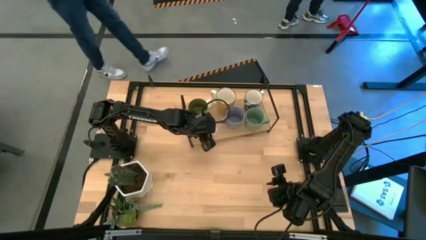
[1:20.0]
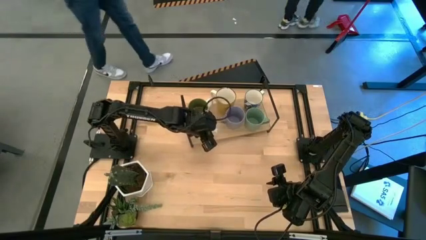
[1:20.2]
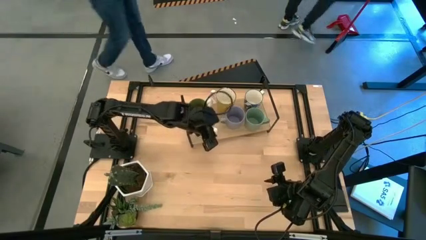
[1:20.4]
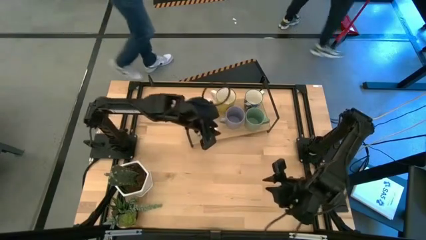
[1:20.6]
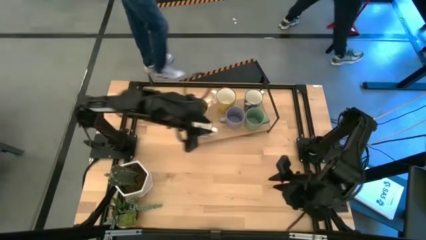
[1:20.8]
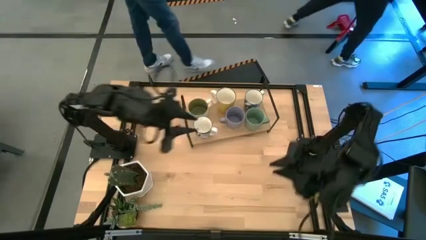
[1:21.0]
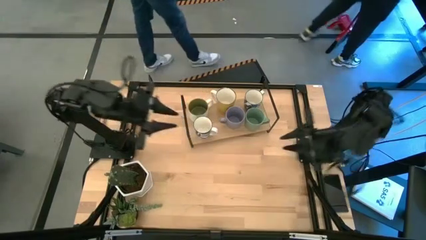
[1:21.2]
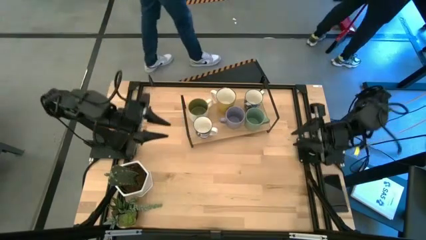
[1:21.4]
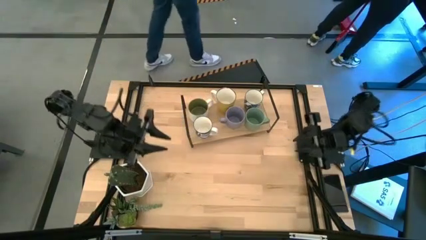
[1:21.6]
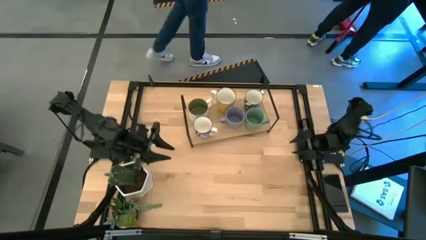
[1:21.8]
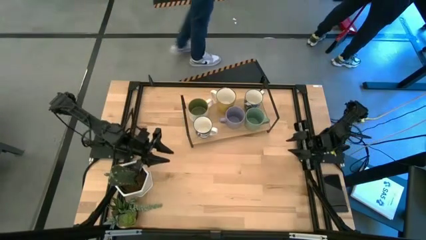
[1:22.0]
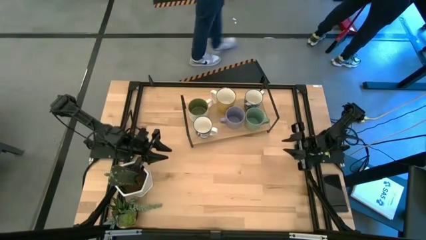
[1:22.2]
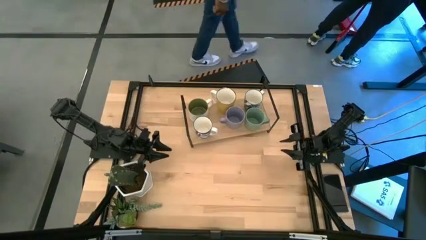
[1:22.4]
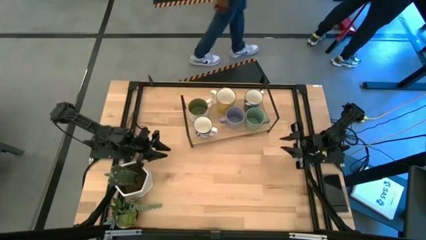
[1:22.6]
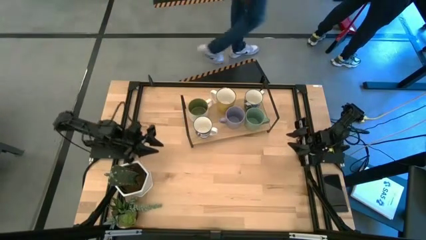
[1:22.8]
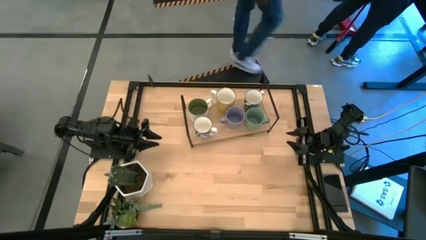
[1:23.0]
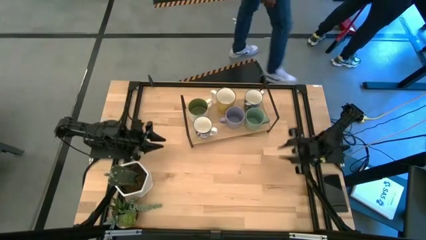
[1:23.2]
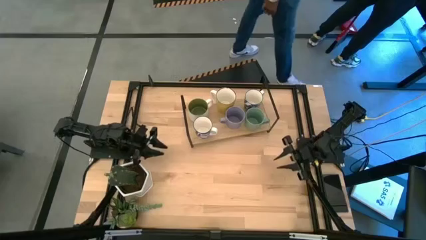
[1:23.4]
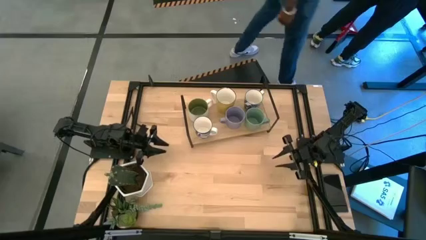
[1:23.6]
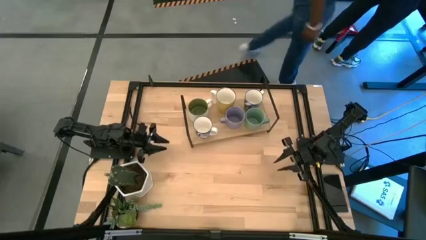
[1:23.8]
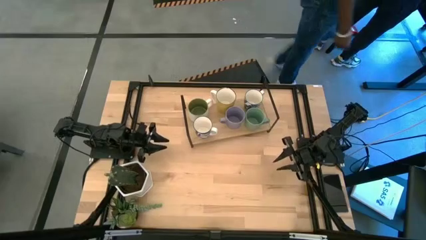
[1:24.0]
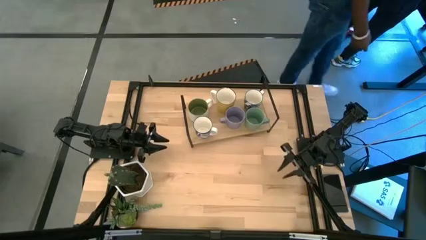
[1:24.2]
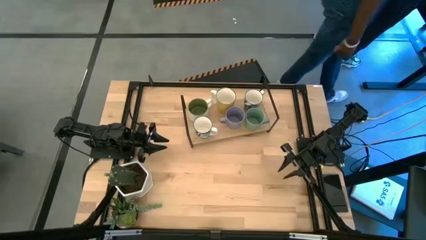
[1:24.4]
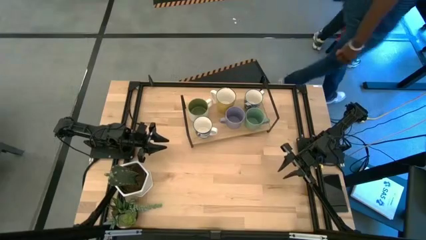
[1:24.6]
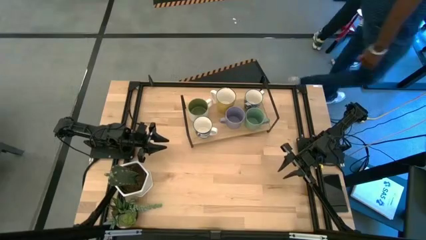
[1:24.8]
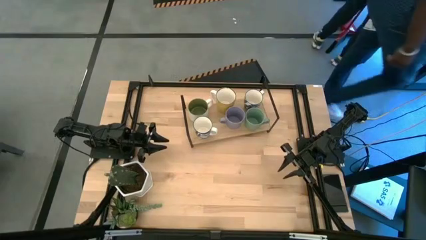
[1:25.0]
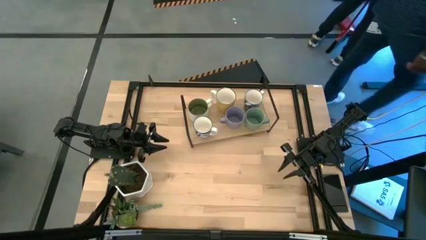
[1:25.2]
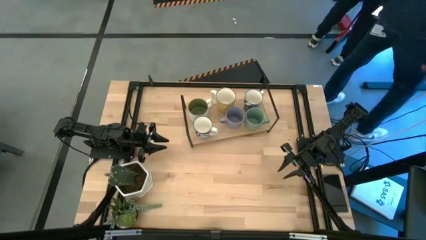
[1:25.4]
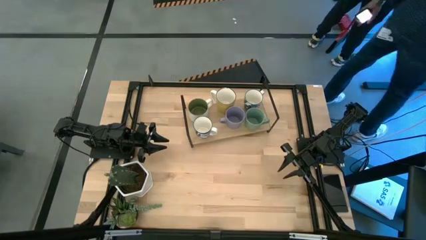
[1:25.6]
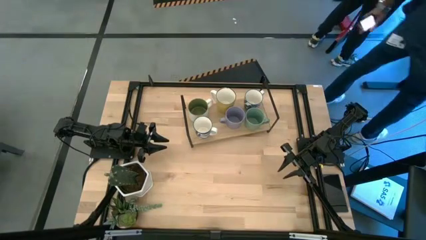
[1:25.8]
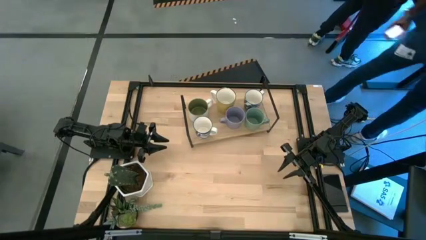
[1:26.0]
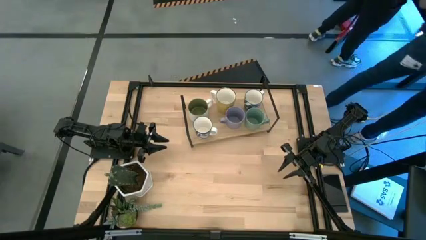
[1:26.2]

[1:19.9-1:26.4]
Task: Place coffee mugs
Return to Home Position

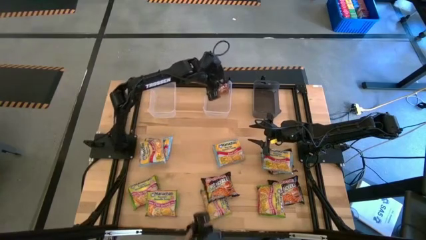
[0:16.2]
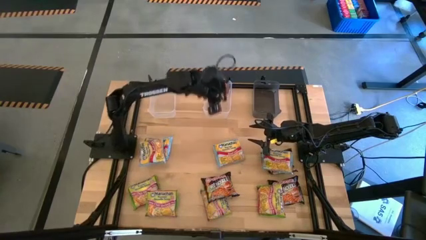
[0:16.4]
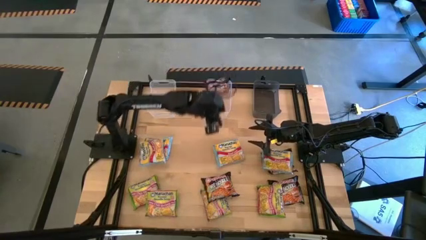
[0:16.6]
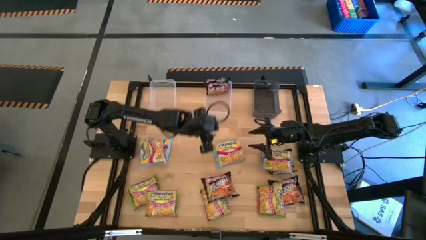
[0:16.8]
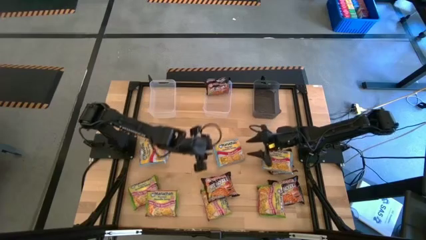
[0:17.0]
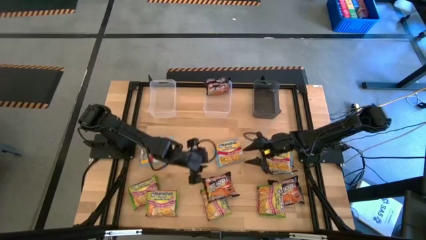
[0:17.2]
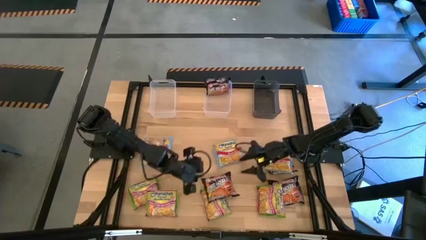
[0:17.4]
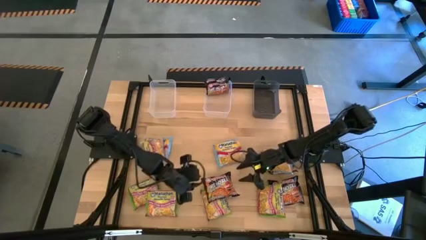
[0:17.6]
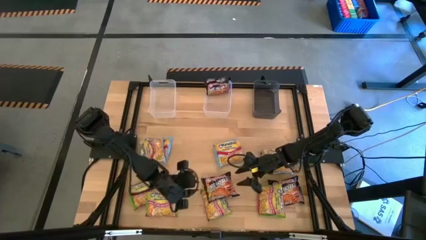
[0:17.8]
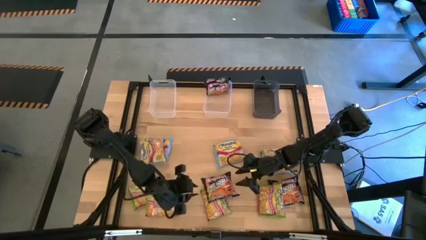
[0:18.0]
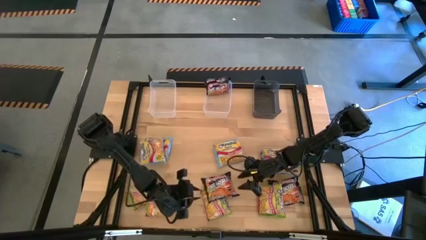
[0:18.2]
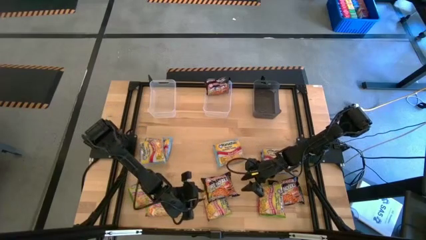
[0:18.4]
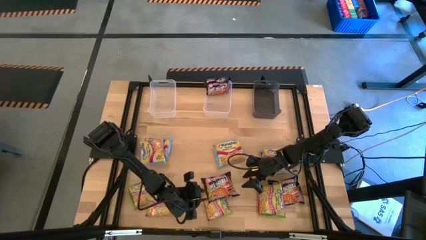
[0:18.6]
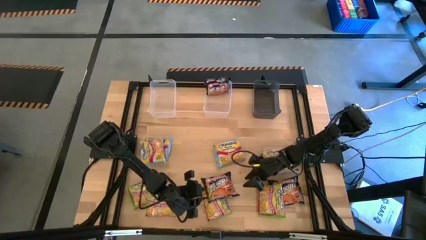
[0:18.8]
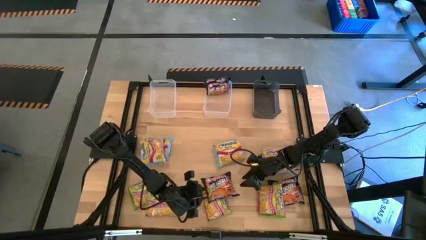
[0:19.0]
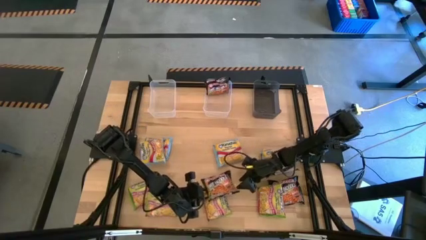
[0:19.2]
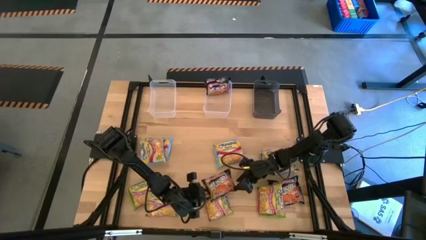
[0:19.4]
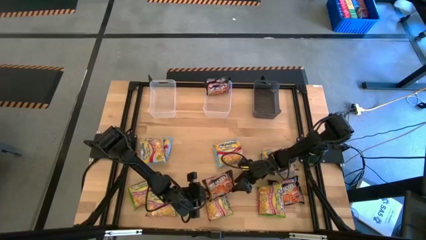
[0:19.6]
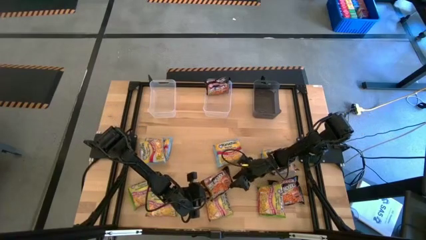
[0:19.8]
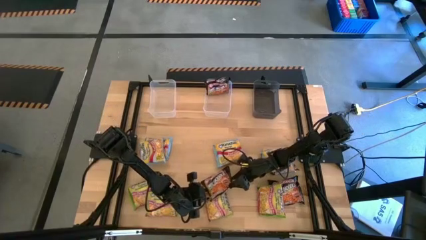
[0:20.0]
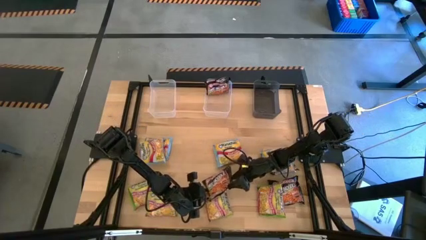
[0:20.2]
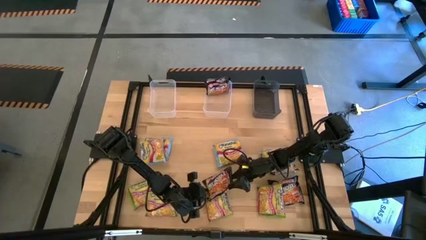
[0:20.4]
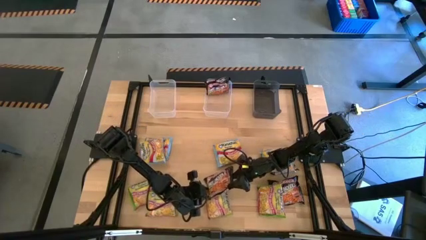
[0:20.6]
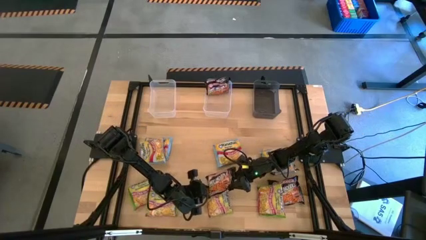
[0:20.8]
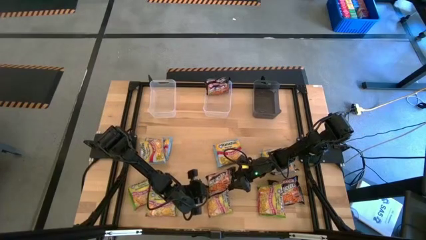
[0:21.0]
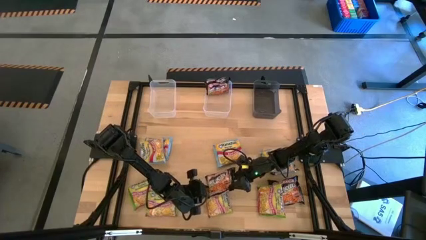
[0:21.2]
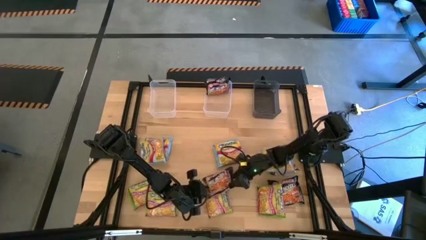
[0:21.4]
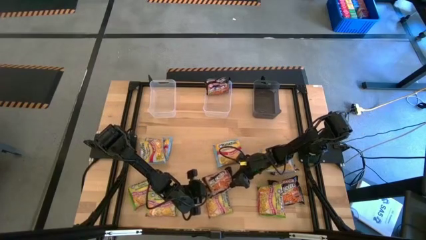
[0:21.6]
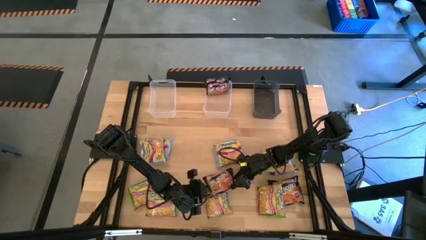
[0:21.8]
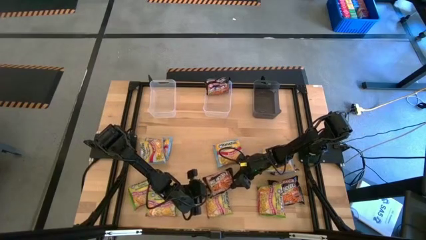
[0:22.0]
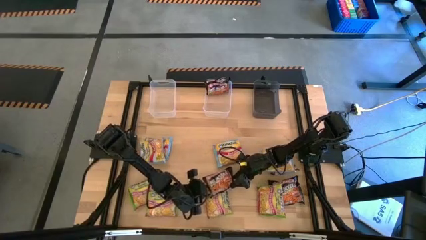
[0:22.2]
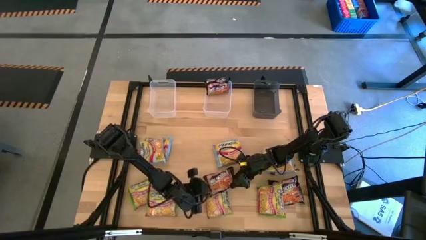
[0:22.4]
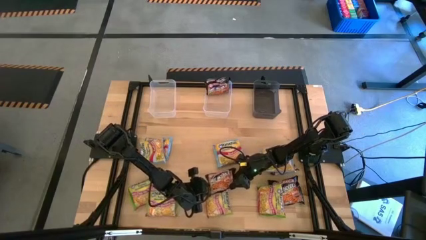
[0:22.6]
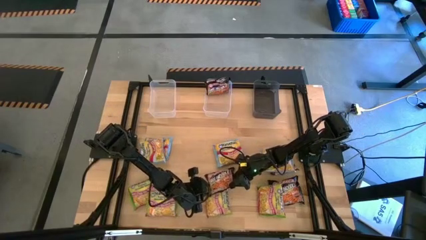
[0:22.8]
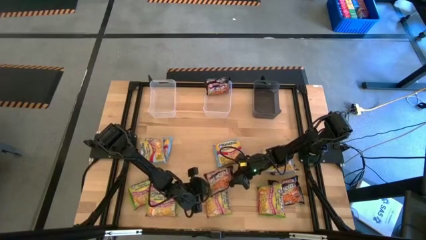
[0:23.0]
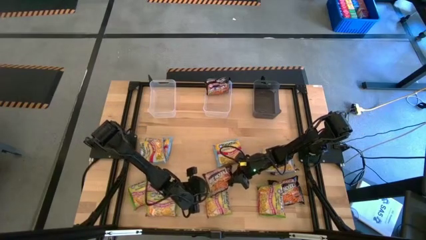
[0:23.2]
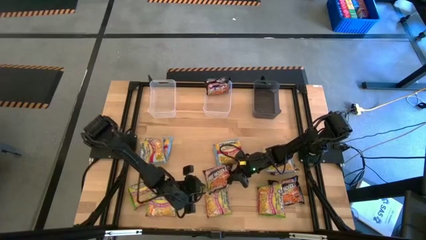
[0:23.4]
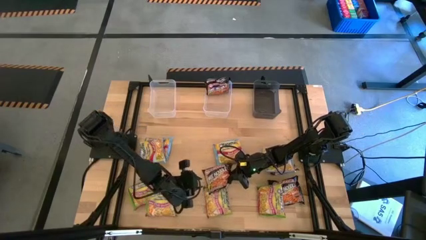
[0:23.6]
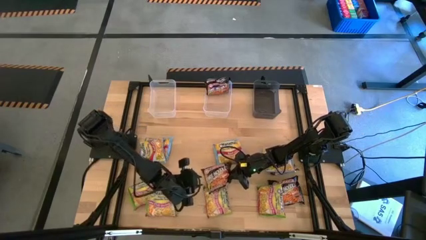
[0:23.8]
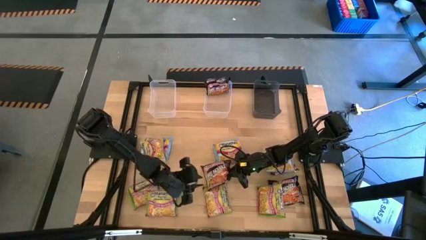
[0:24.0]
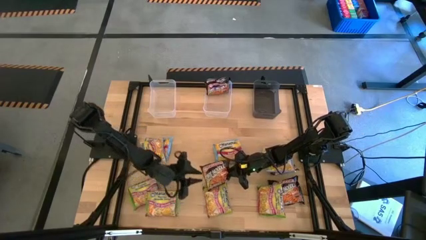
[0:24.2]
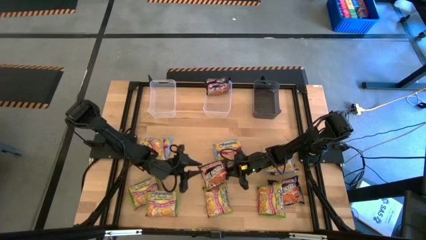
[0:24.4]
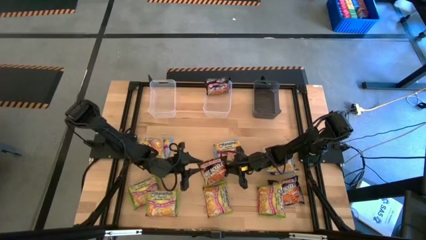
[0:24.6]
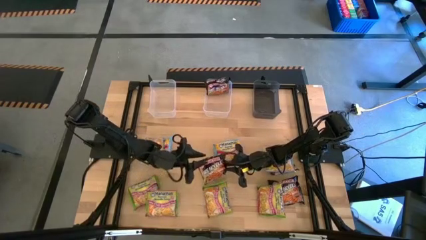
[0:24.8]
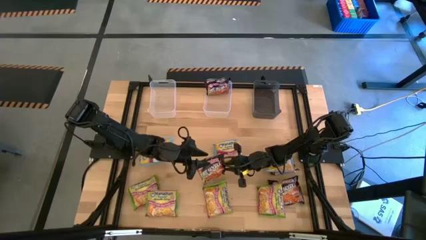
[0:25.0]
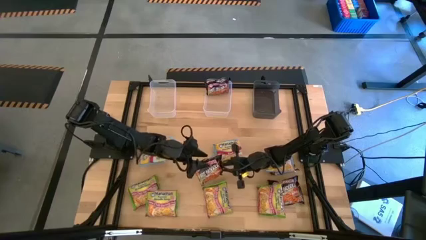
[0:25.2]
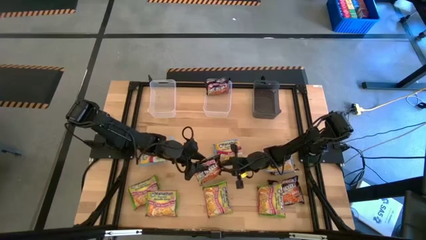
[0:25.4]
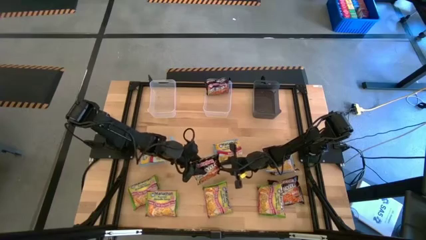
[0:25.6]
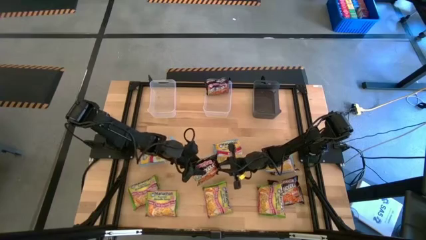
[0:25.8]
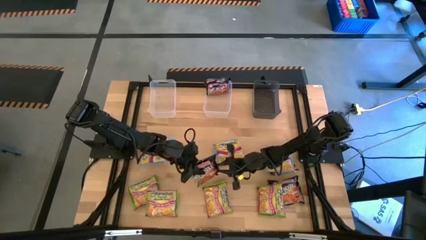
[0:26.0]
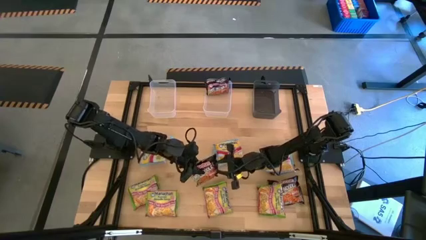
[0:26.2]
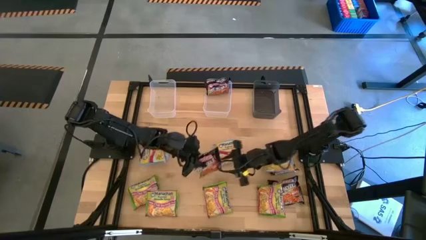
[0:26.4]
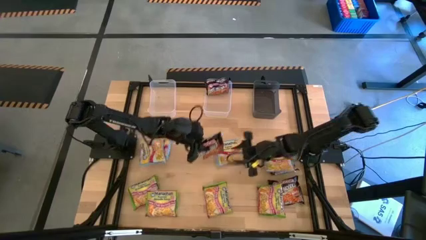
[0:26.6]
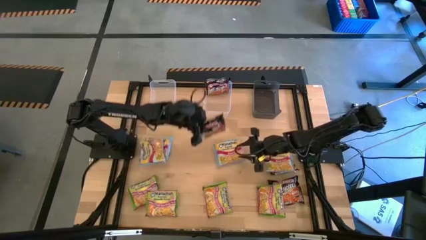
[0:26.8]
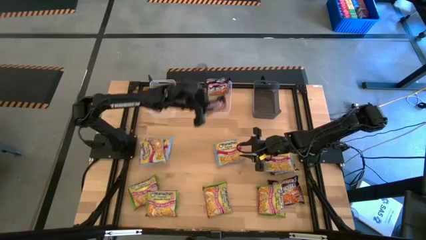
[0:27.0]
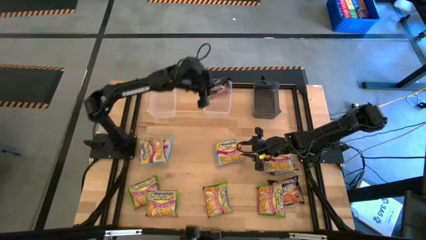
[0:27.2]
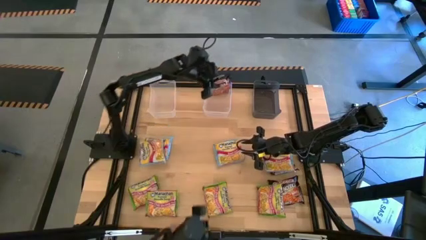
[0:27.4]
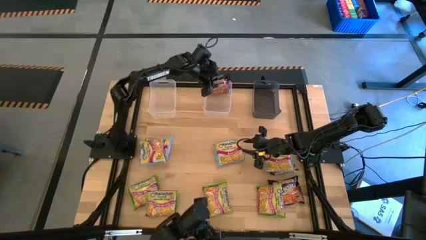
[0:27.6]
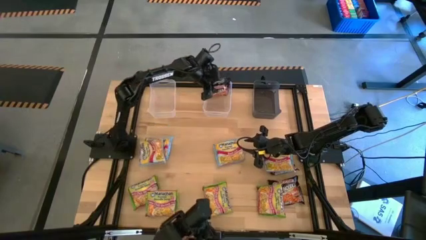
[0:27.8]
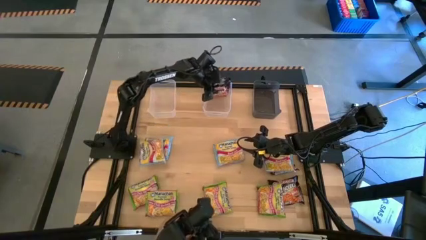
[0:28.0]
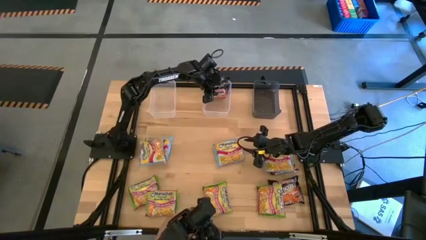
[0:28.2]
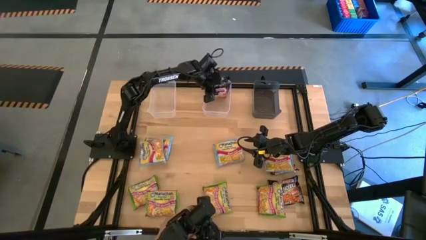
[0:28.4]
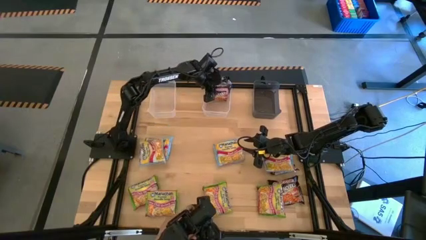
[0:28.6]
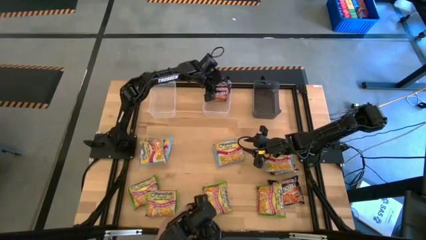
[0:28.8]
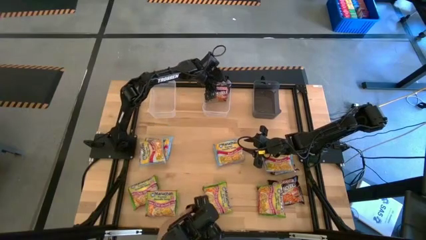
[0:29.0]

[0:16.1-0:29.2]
Task: Sort Maruchan noodles
Put the black noodle pack into the right transparent bin
